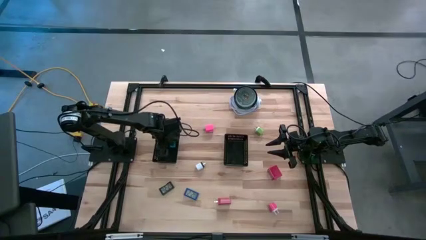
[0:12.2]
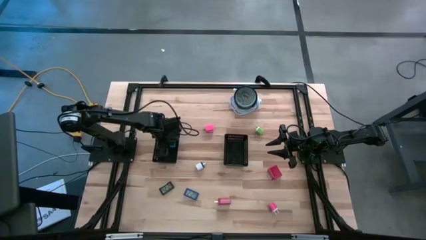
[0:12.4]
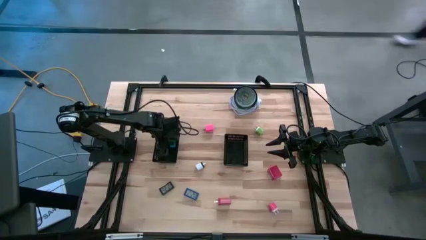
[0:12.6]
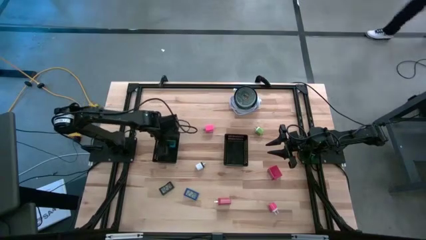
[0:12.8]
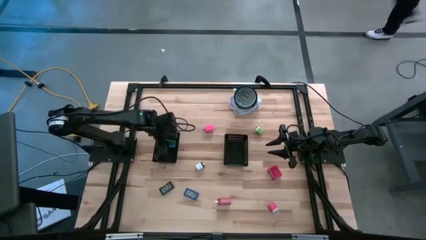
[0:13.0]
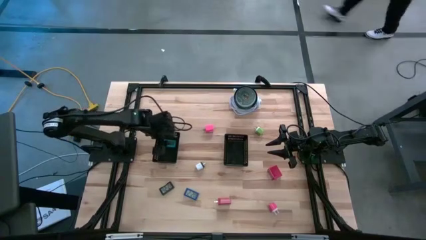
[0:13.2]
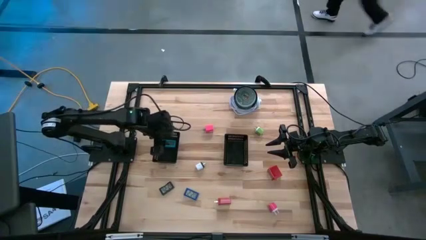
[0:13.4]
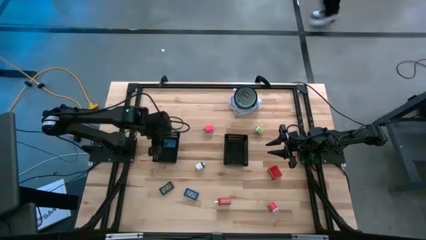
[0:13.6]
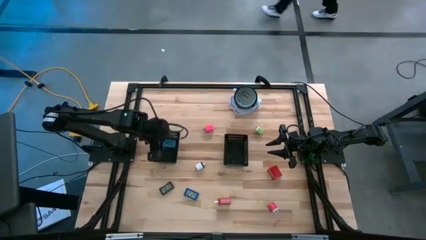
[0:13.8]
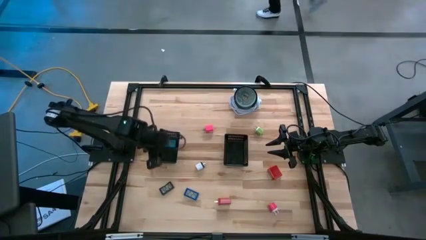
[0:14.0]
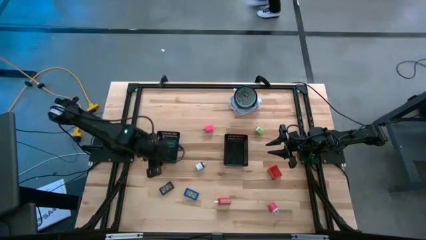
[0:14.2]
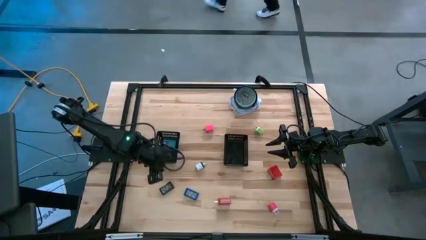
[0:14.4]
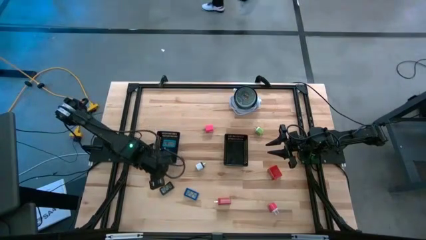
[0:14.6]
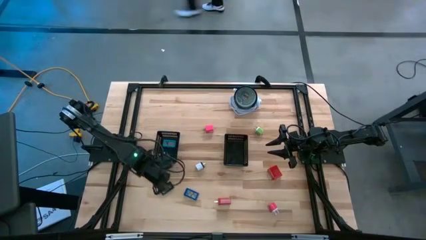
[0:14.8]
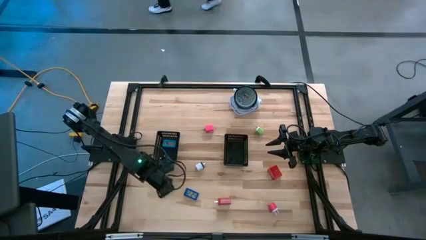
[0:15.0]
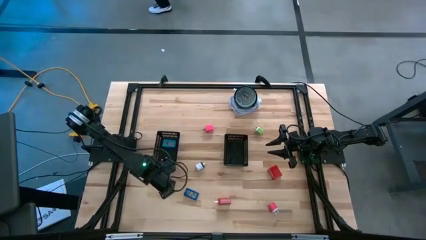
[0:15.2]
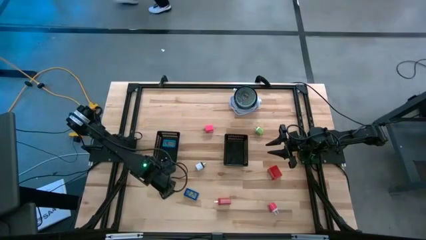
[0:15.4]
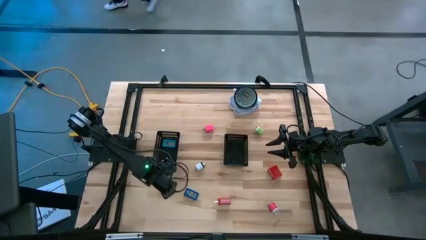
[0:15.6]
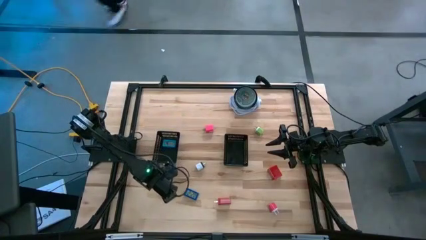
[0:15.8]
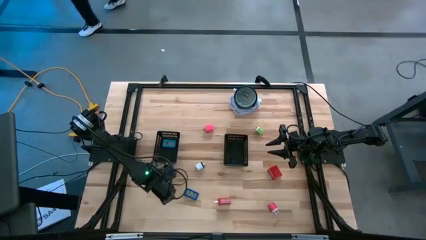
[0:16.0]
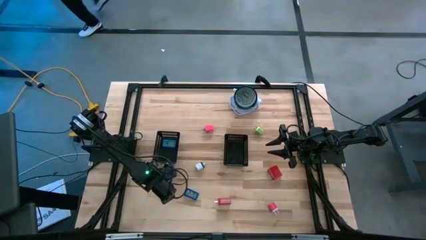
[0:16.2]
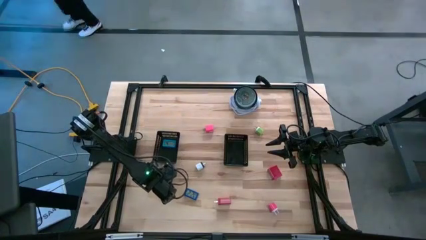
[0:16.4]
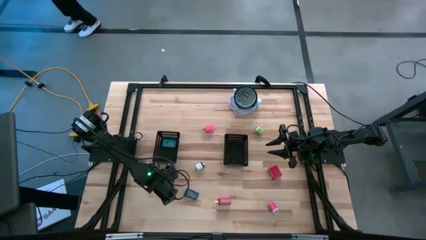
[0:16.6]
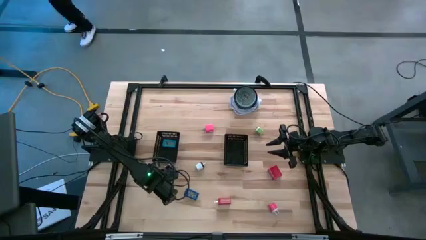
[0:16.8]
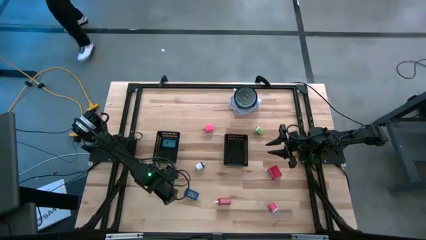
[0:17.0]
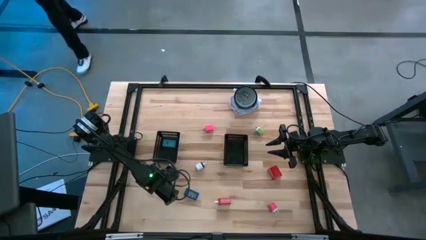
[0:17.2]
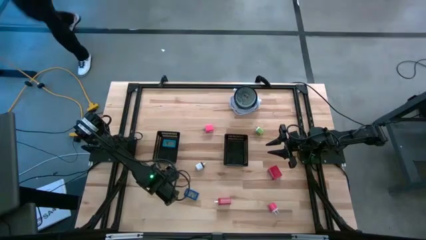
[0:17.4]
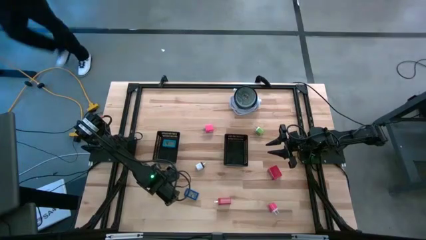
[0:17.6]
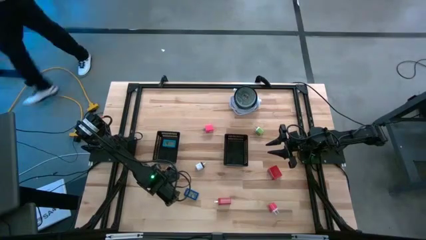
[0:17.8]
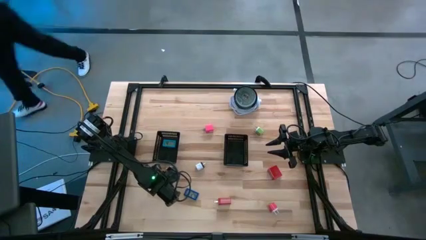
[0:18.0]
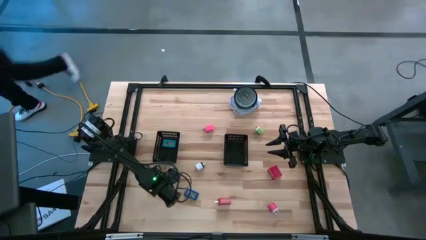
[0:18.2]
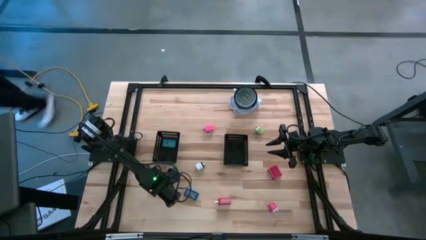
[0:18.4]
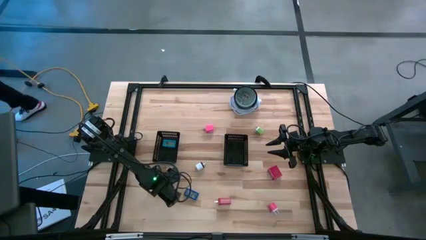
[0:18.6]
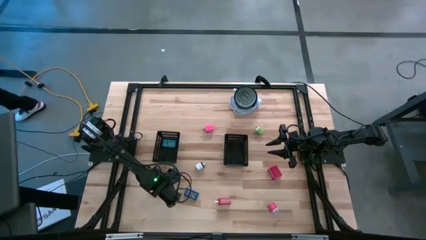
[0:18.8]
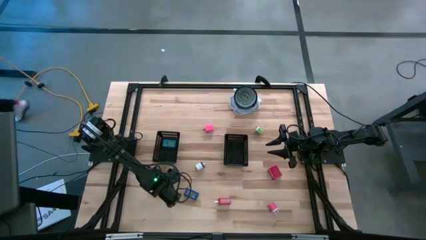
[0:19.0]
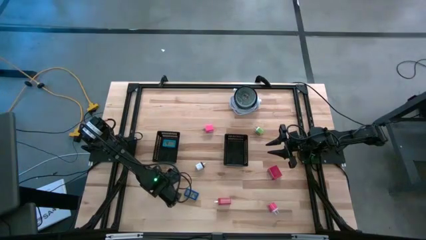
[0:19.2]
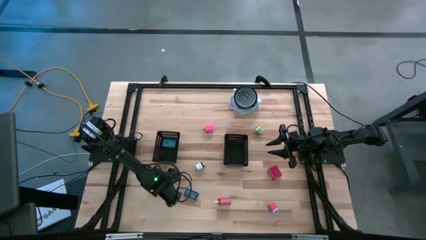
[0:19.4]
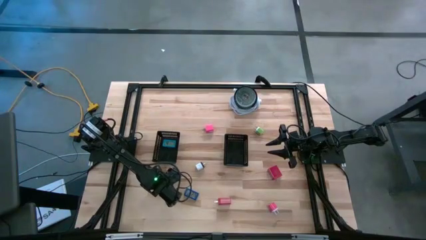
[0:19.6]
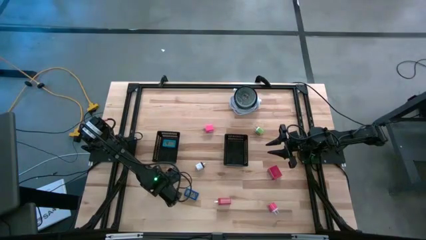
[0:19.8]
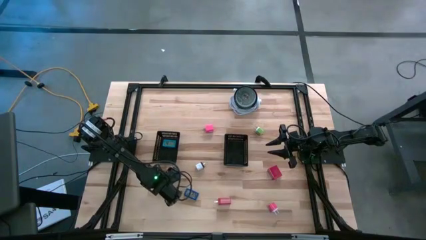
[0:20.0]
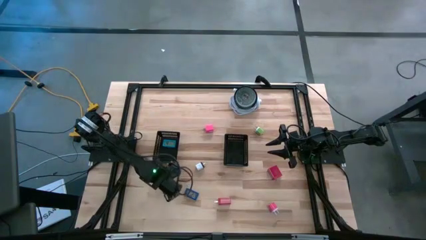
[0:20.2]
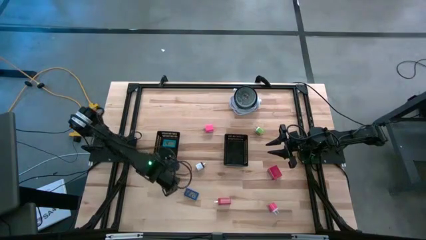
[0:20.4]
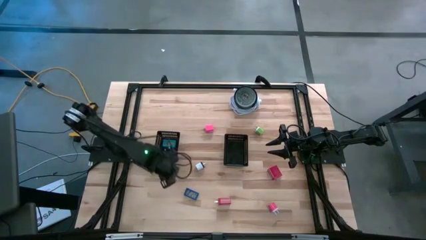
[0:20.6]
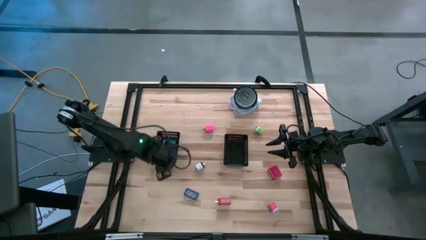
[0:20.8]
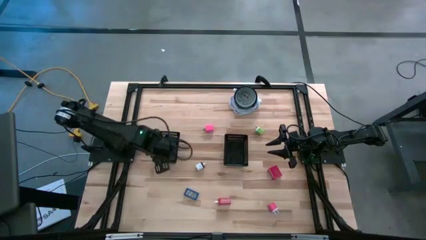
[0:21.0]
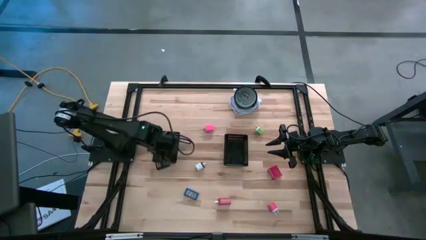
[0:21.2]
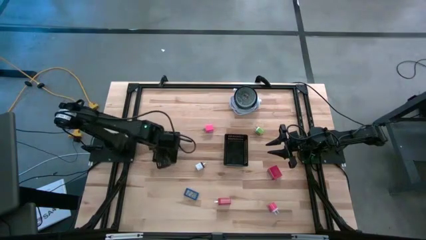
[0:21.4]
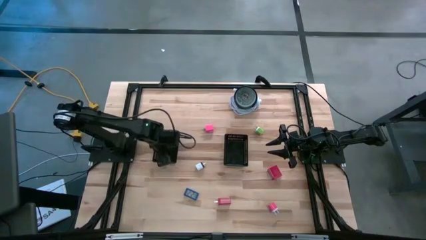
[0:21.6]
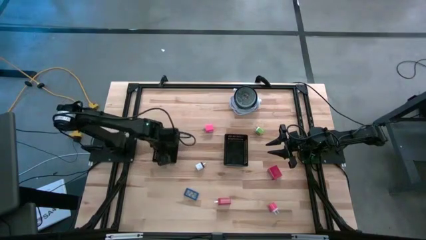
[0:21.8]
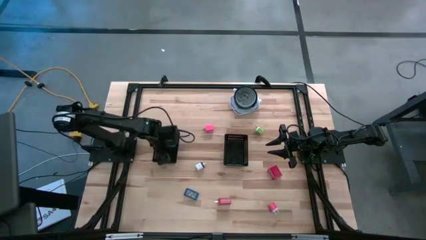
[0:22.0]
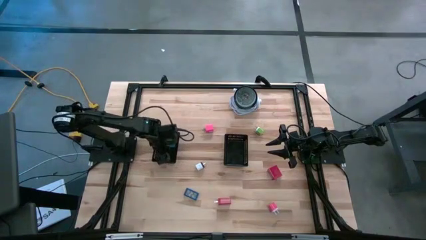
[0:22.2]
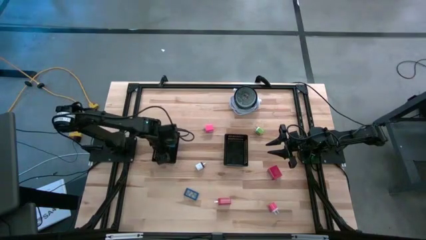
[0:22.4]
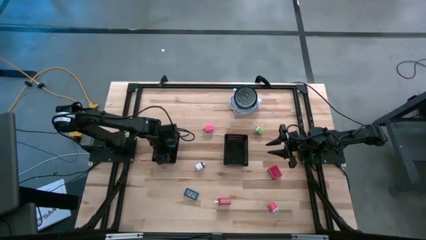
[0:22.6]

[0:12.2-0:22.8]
Task: Pick & Place Office items
Put the black digital clock into the left black bin

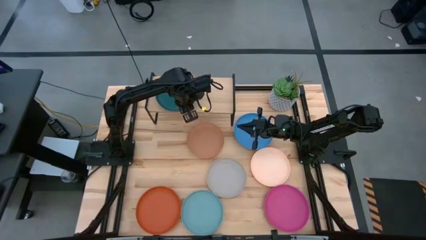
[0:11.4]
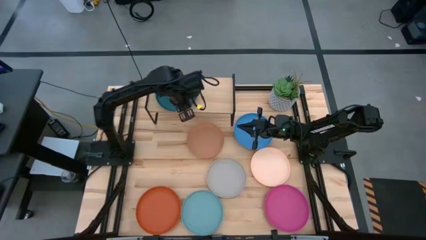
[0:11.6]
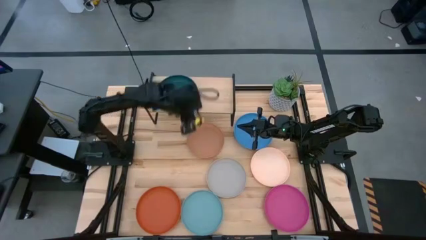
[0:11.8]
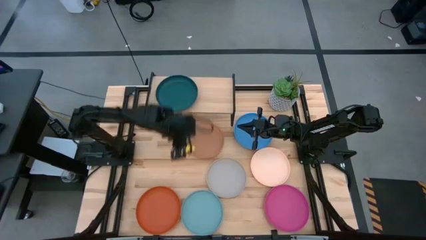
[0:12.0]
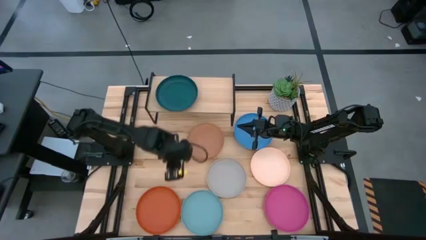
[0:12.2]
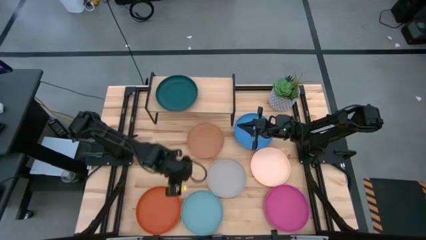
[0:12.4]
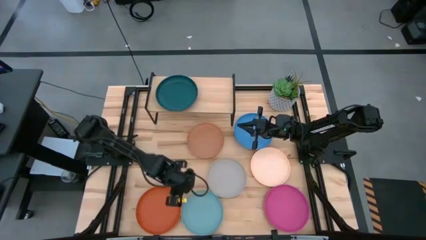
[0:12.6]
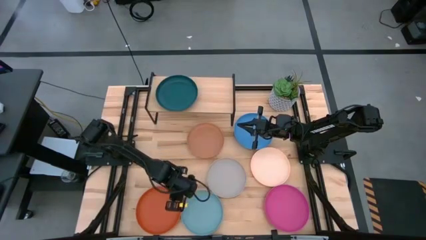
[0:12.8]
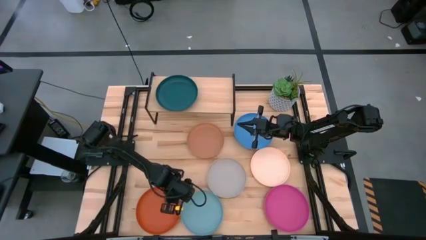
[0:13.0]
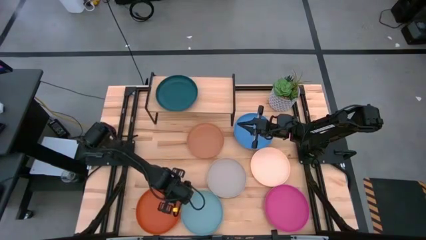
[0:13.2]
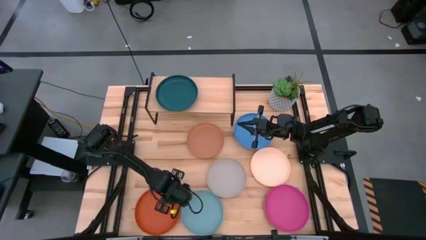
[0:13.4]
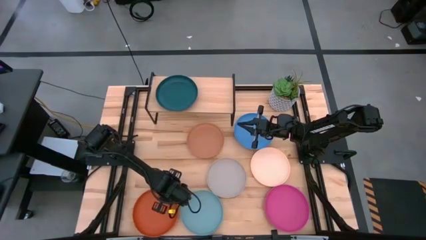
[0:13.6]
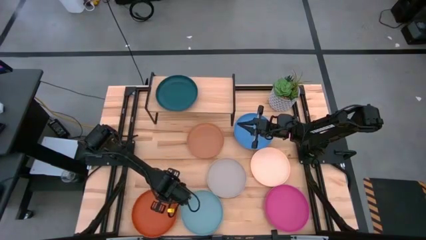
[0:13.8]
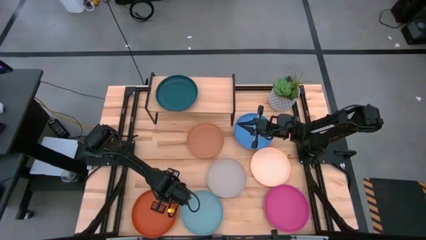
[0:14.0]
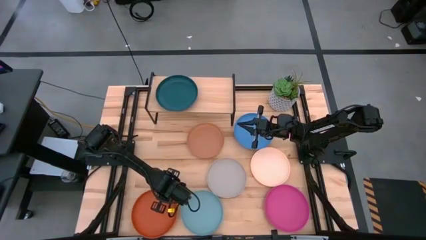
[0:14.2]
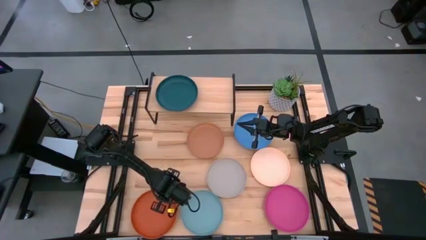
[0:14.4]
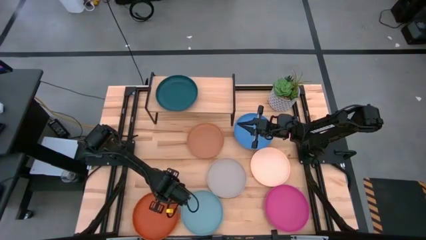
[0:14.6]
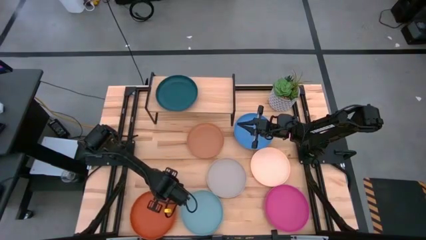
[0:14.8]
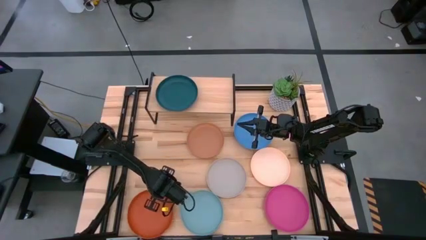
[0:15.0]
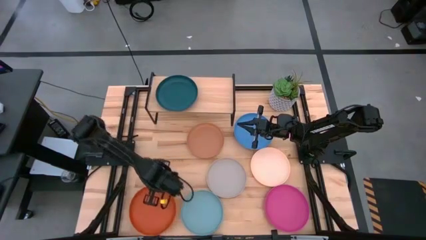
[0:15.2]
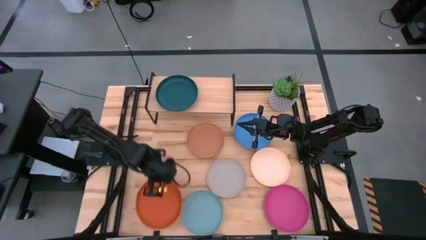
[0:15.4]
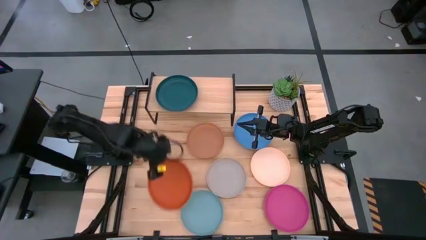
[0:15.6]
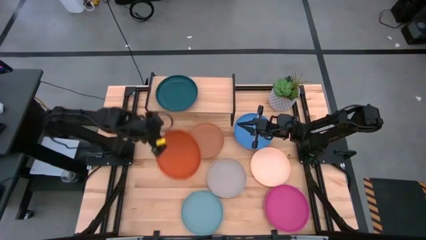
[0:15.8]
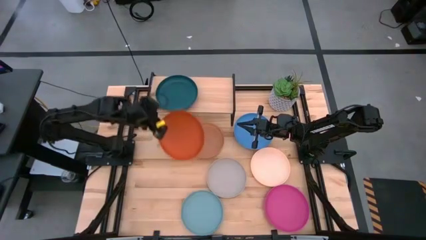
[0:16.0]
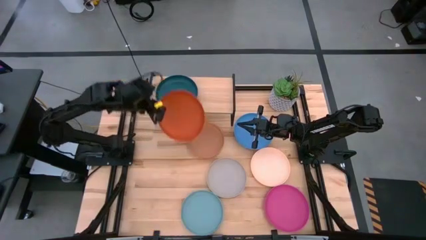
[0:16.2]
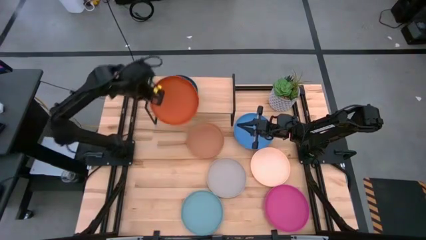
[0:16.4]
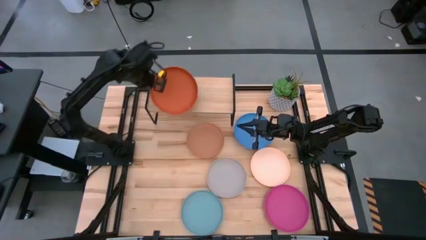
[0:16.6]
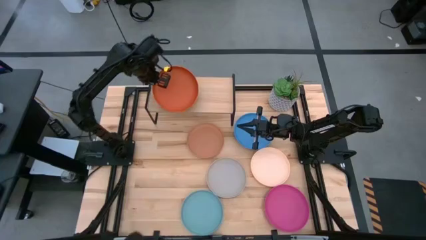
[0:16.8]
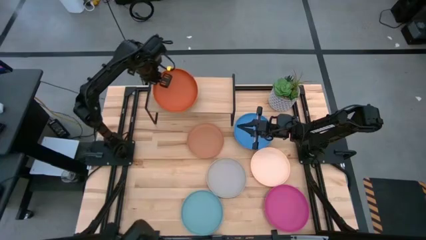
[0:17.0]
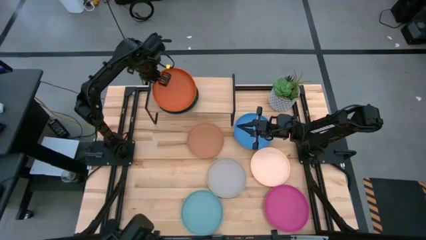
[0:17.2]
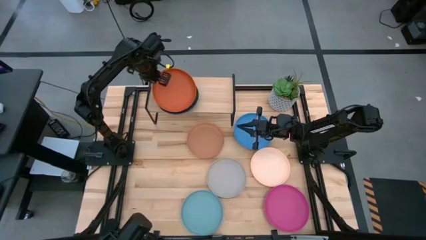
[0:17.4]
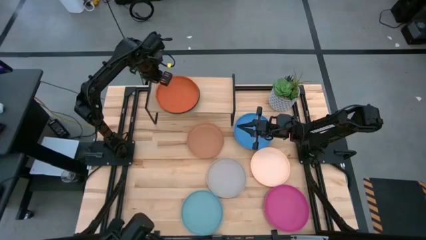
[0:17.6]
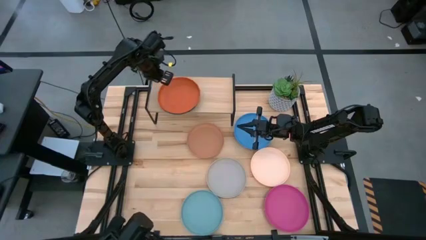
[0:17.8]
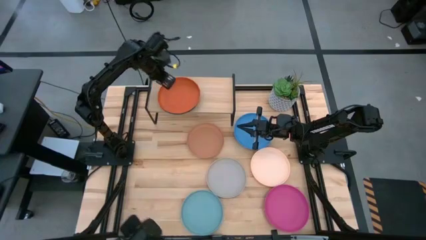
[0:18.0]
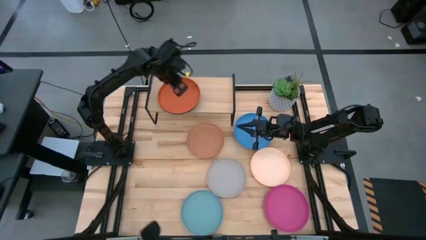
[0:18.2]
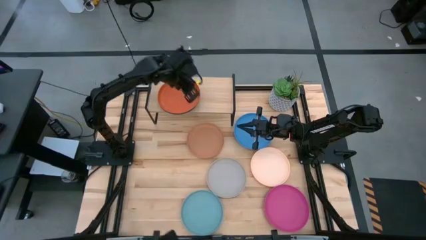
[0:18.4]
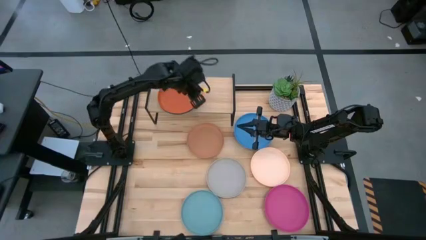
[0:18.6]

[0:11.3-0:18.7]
Task: Place and stack plates onto a shelf
Stack the orange plate on top of the green plate on the shelf

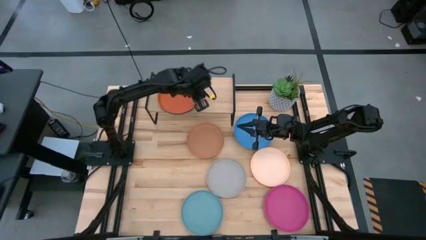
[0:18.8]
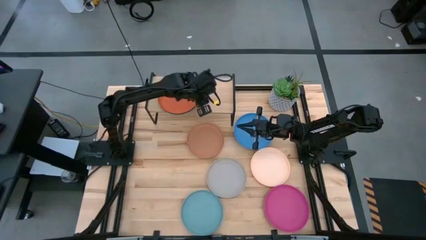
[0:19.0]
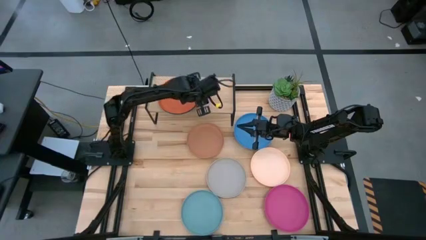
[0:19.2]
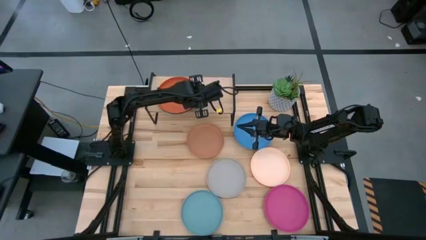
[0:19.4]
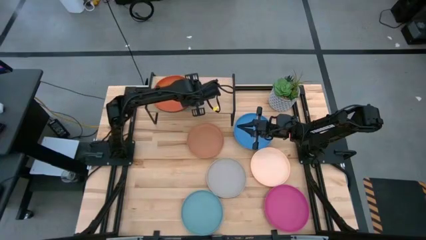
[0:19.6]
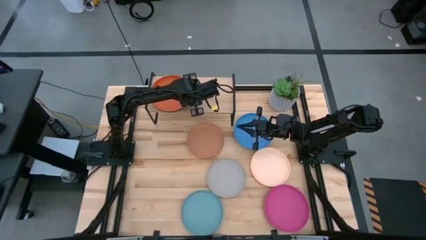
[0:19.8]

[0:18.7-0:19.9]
Adjust the stack of plates on the shelf
